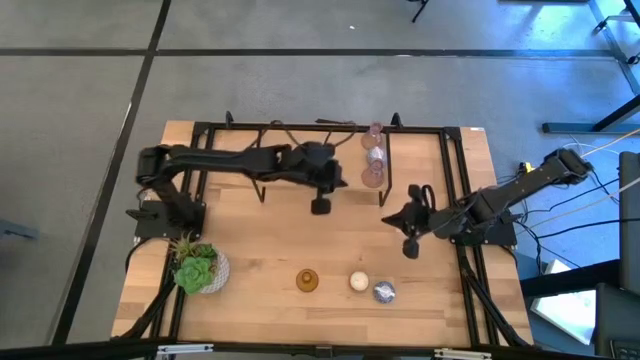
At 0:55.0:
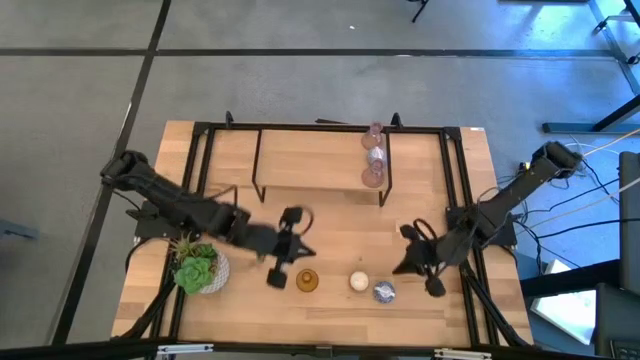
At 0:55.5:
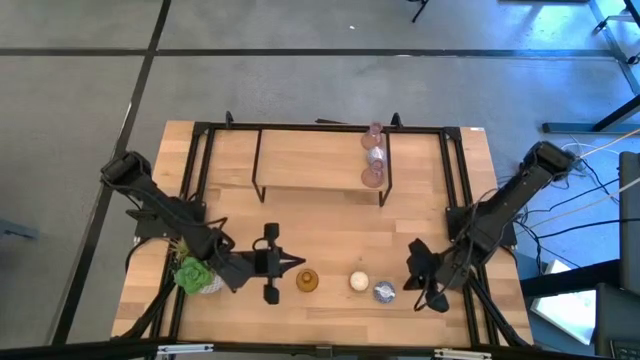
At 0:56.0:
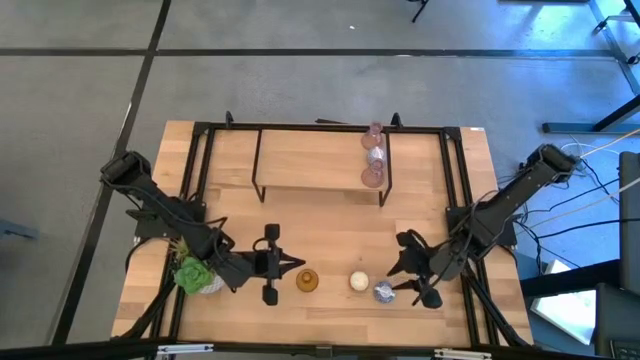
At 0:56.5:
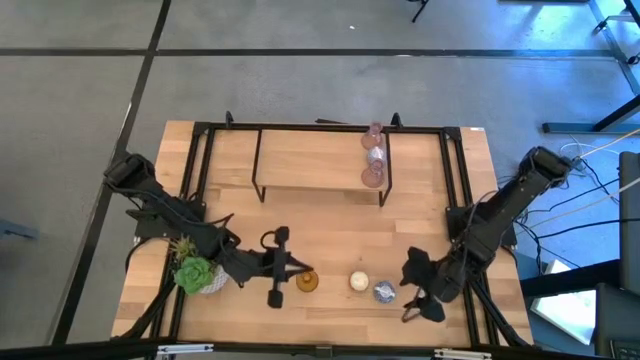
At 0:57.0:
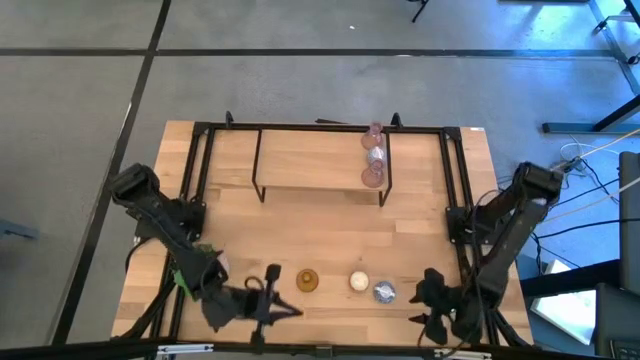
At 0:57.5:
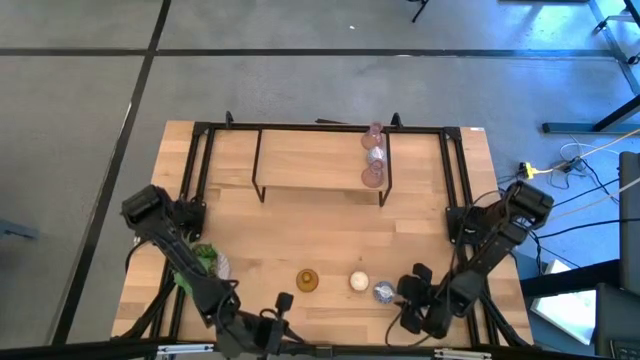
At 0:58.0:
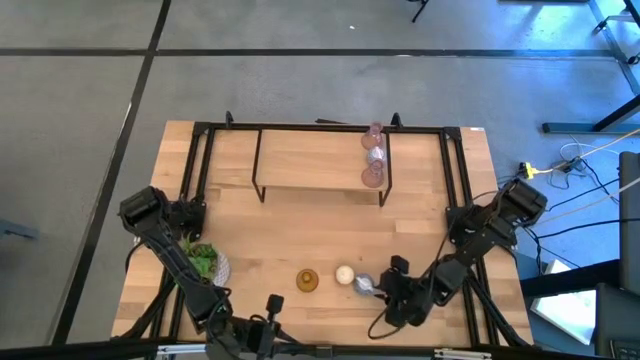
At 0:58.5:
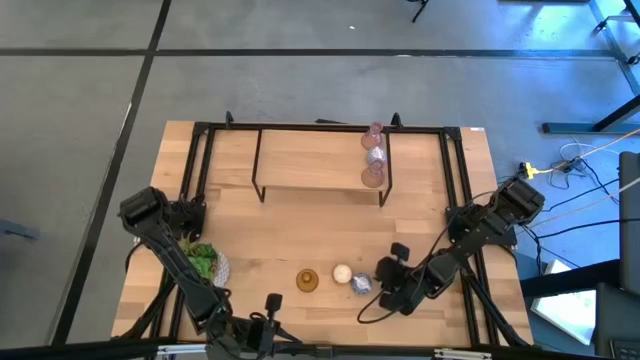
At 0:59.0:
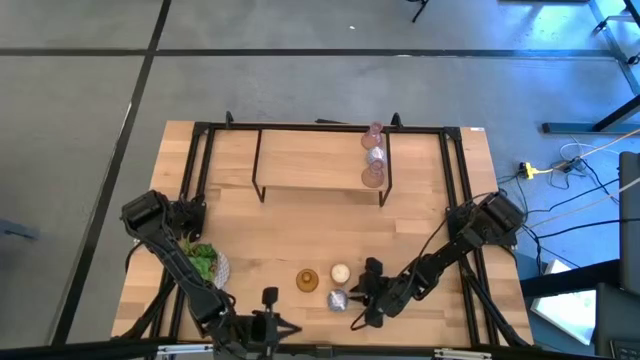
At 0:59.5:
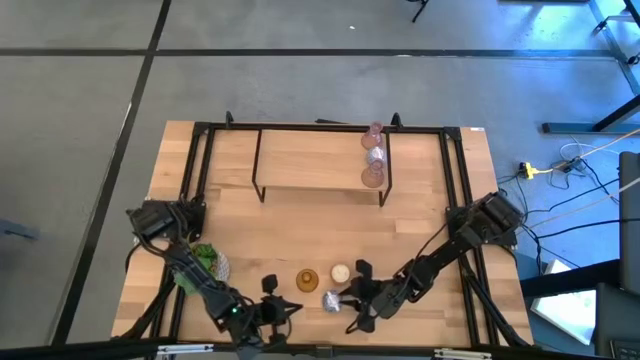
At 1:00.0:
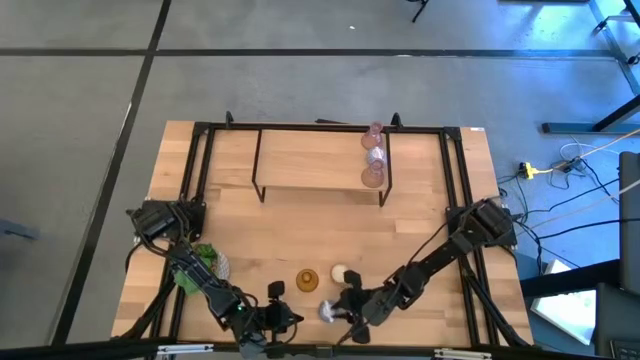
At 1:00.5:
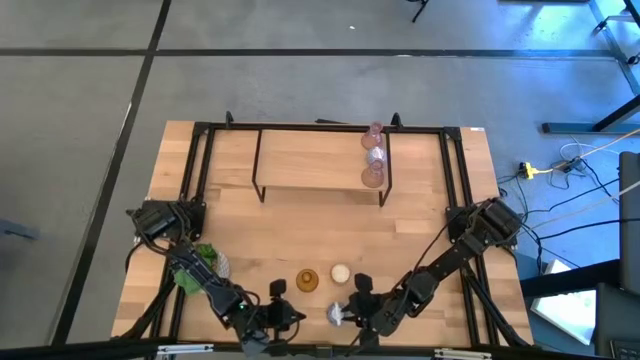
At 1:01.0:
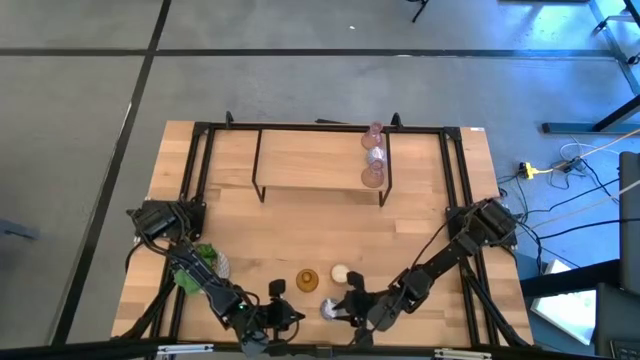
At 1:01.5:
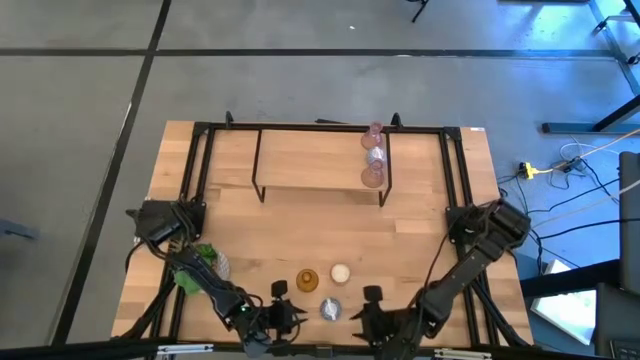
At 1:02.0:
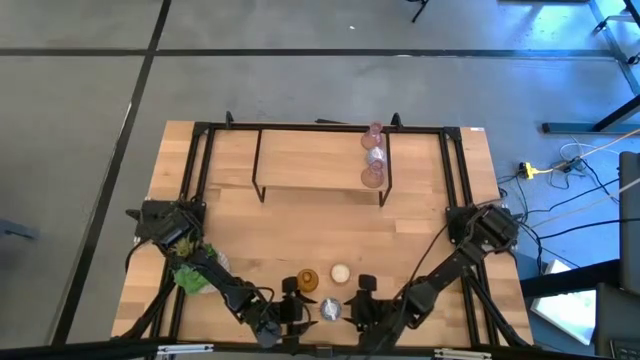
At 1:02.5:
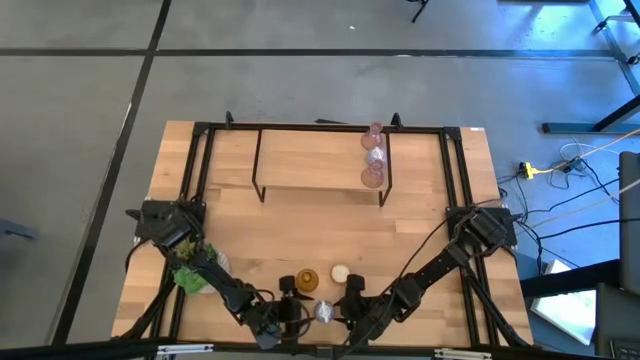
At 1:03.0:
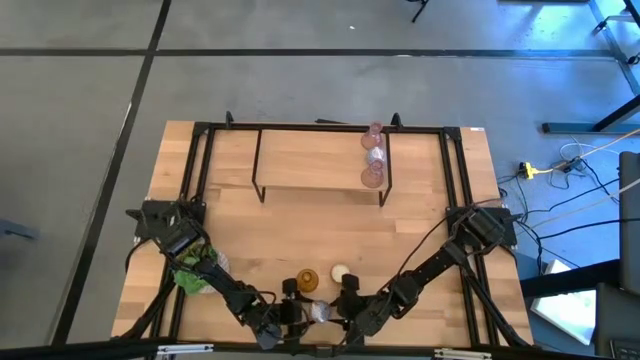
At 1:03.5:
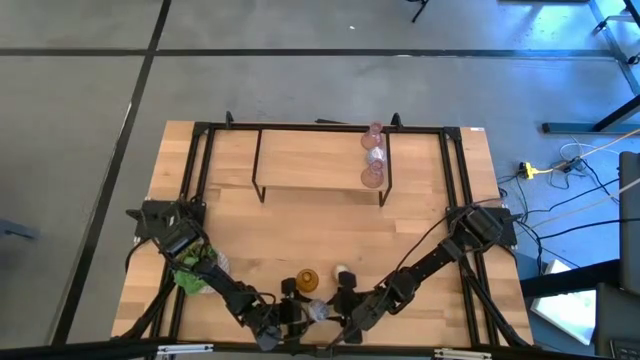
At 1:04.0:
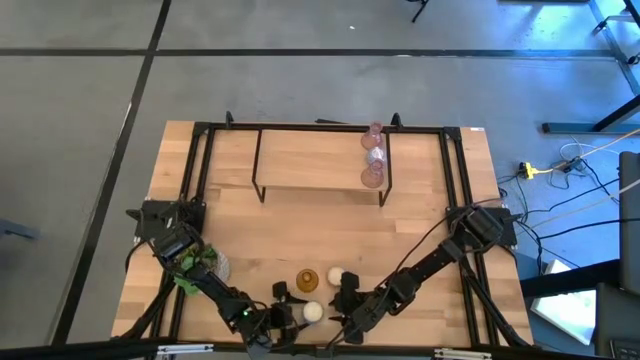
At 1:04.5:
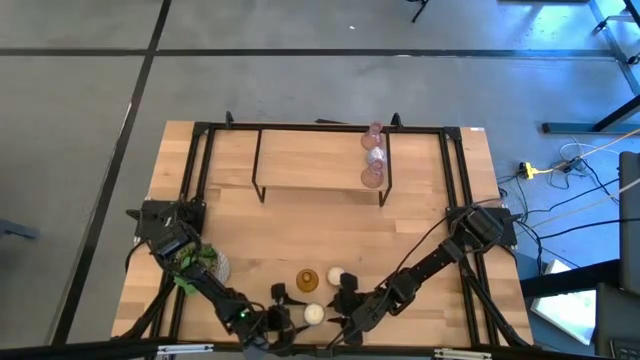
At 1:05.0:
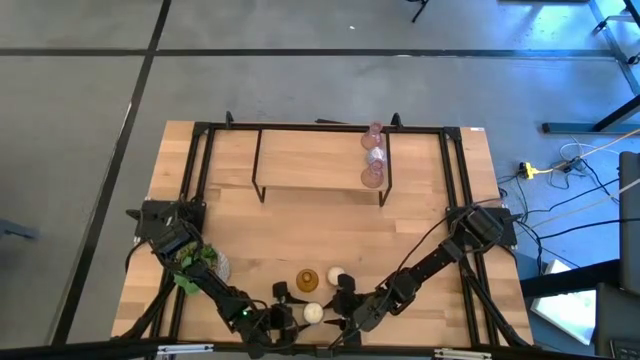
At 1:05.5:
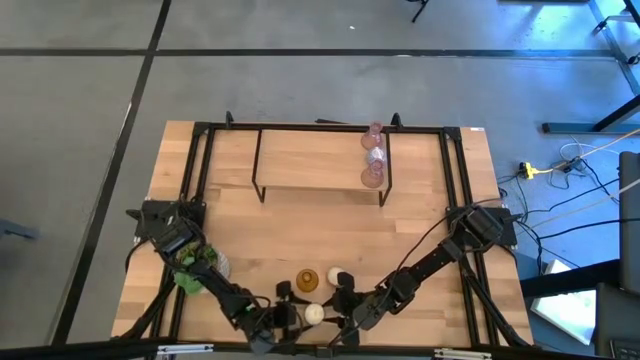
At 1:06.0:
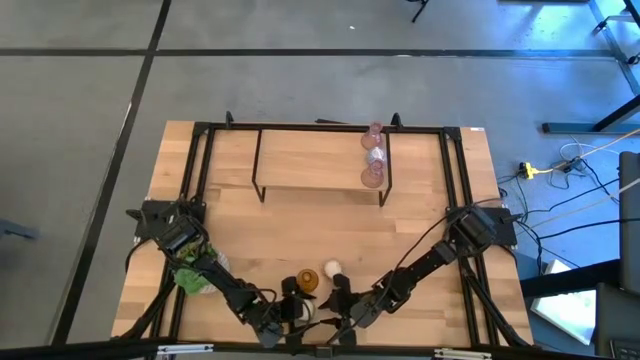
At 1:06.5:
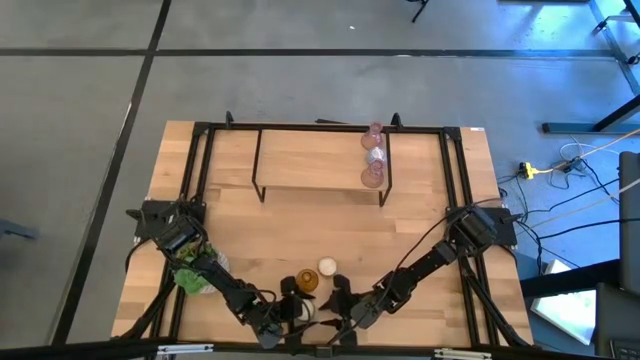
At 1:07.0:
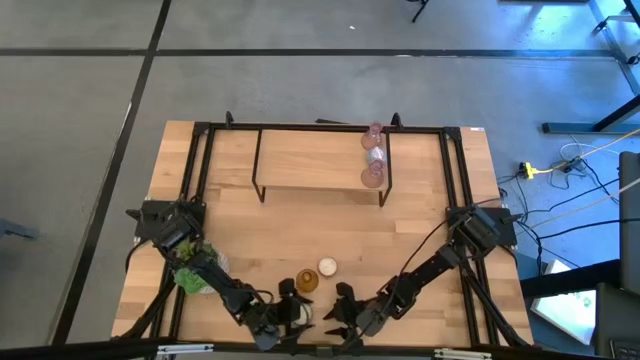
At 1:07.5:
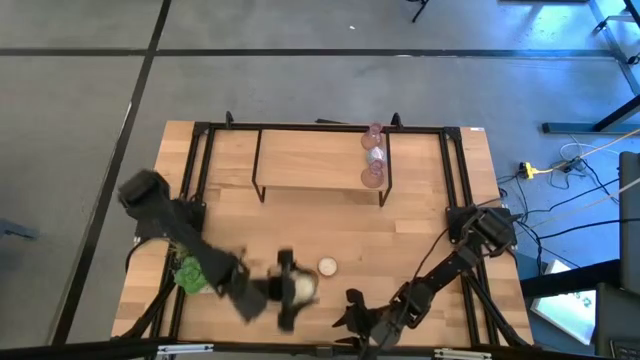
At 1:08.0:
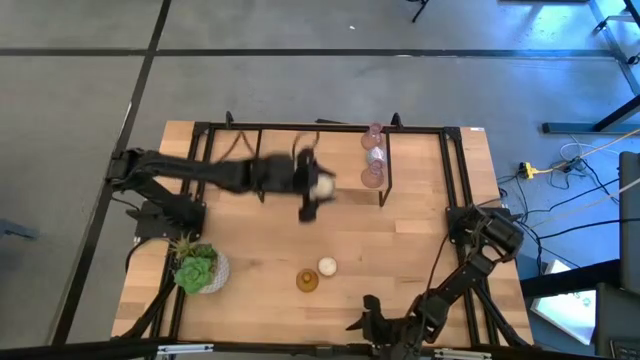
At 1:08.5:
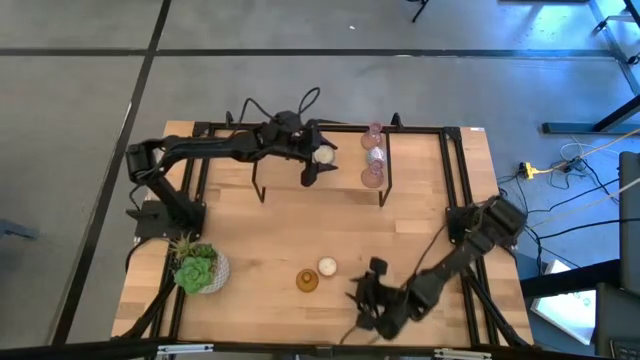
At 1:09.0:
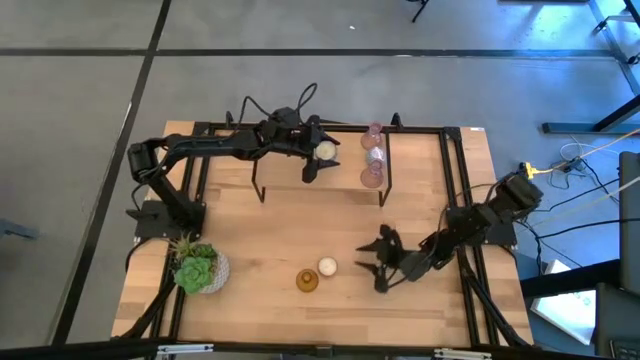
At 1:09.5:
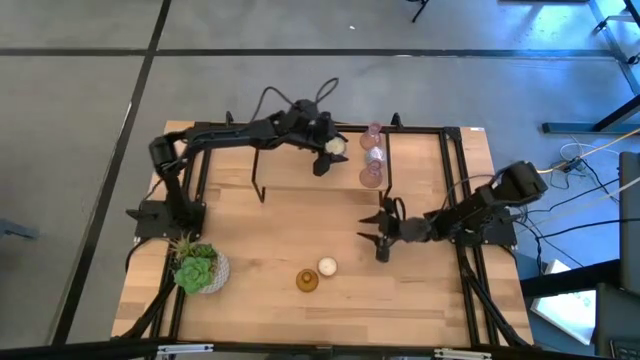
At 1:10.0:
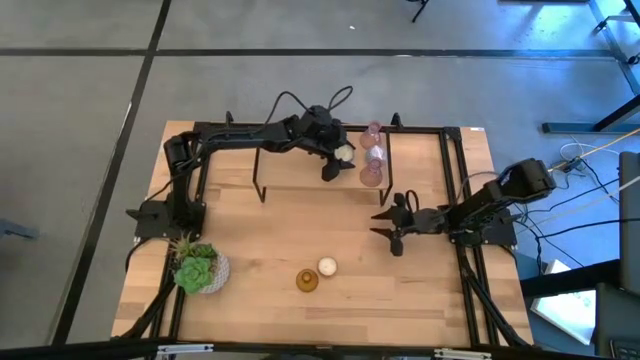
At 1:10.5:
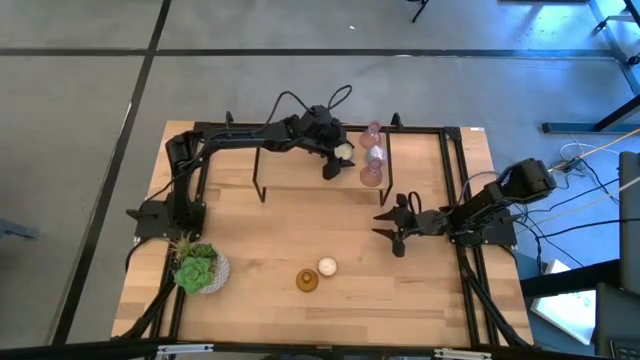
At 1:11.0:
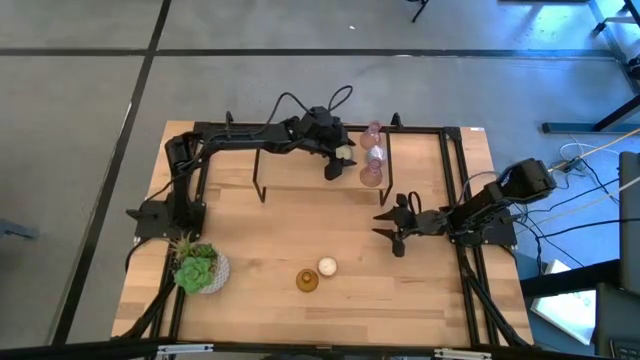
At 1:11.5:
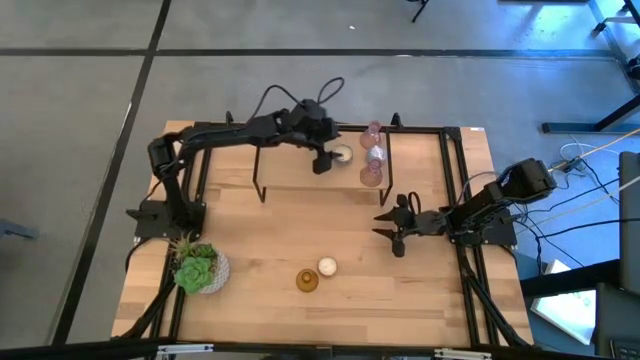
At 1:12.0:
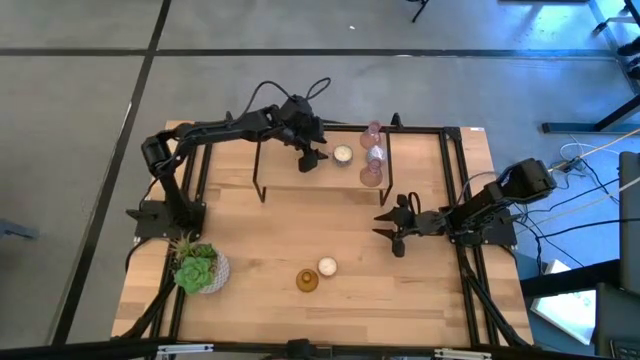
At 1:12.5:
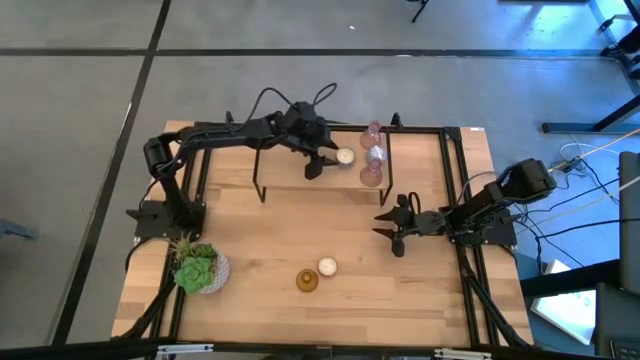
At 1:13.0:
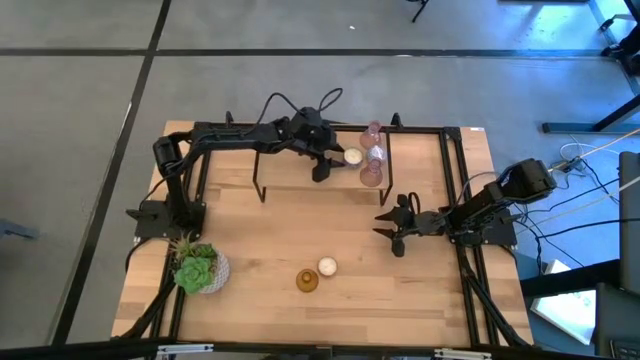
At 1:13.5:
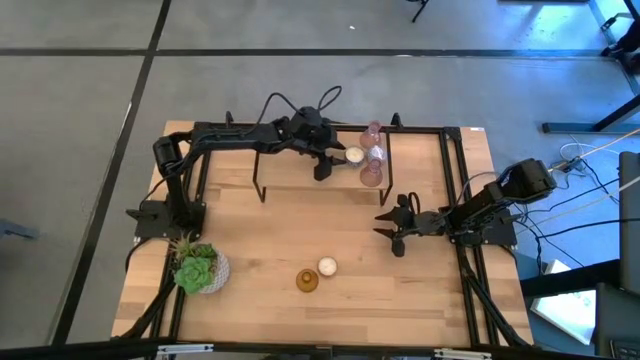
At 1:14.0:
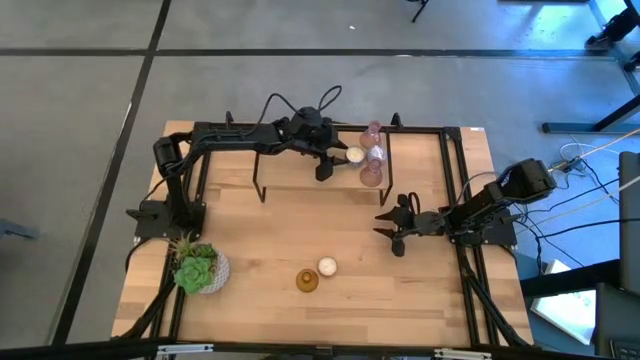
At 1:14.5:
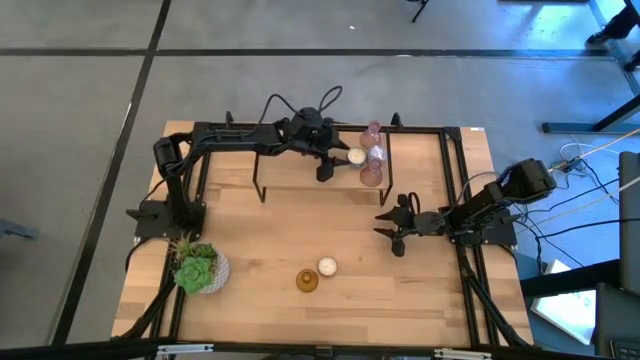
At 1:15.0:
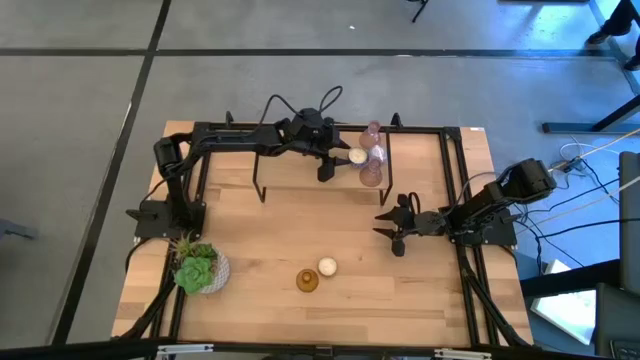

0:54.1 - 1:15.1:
Task: Pick & Place candle stick holders
Put the blue scented candle on the shelf
